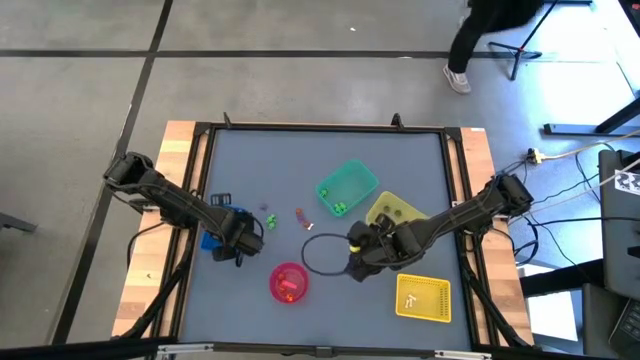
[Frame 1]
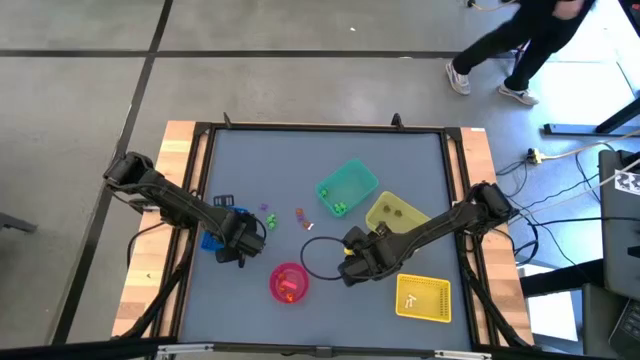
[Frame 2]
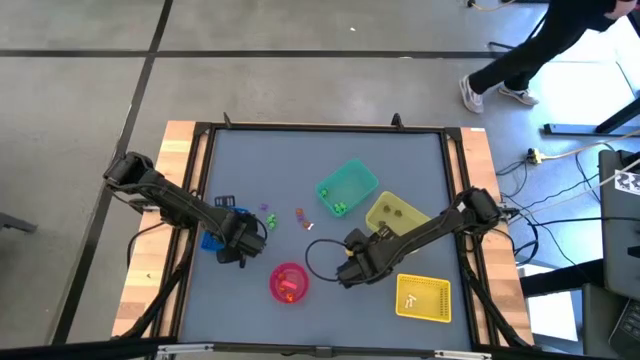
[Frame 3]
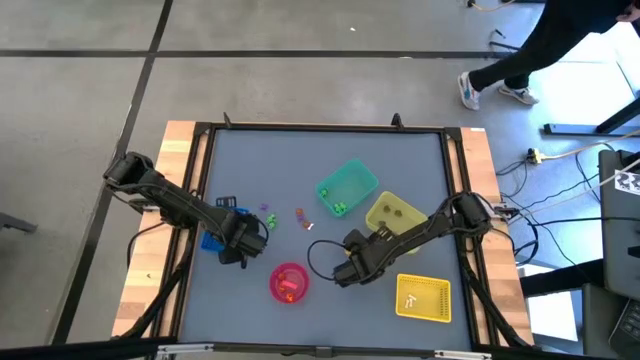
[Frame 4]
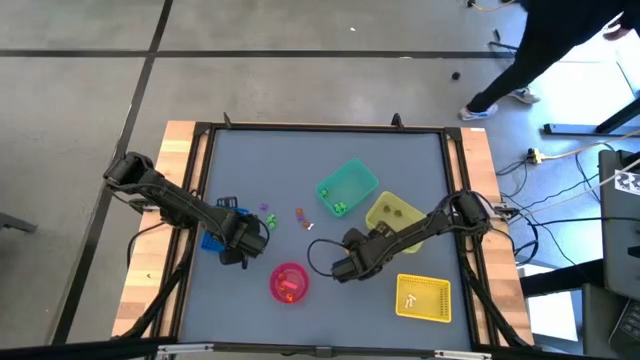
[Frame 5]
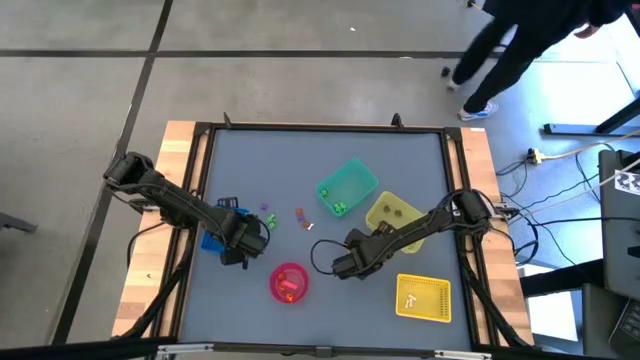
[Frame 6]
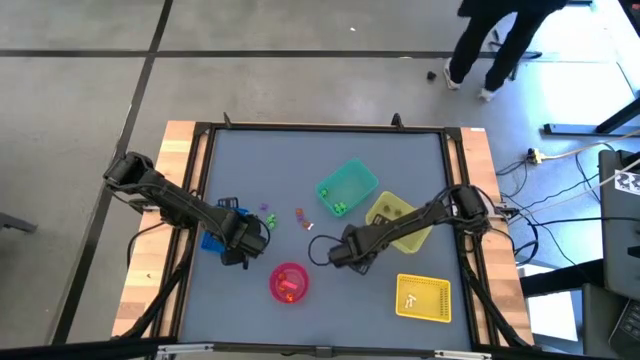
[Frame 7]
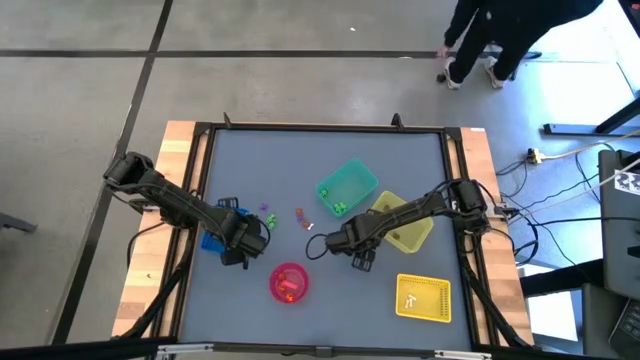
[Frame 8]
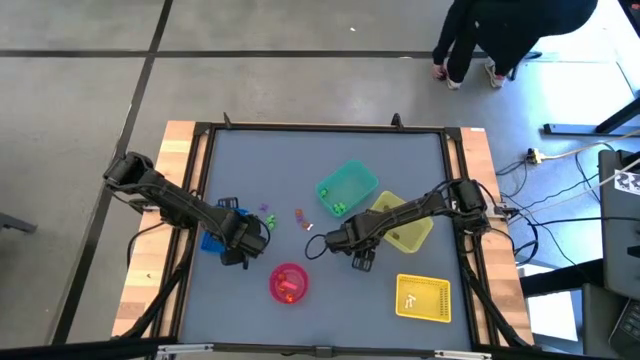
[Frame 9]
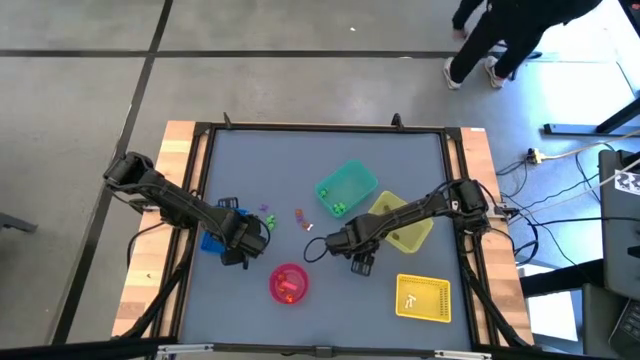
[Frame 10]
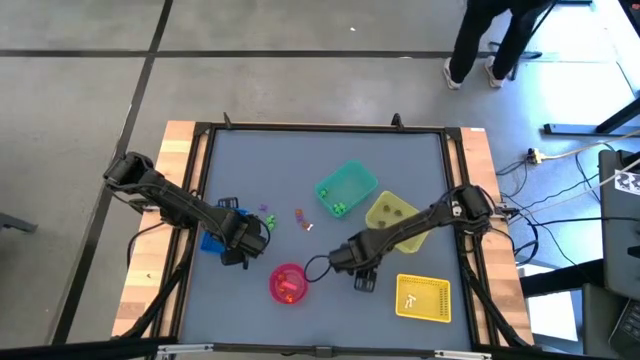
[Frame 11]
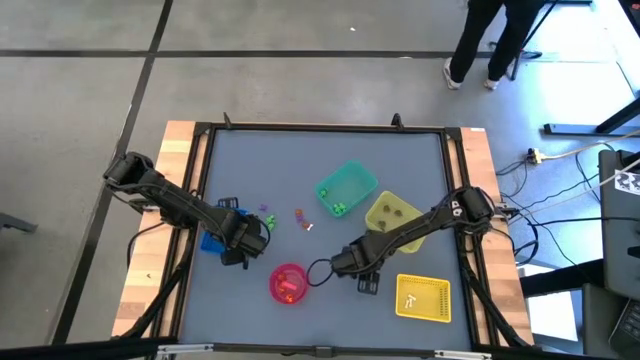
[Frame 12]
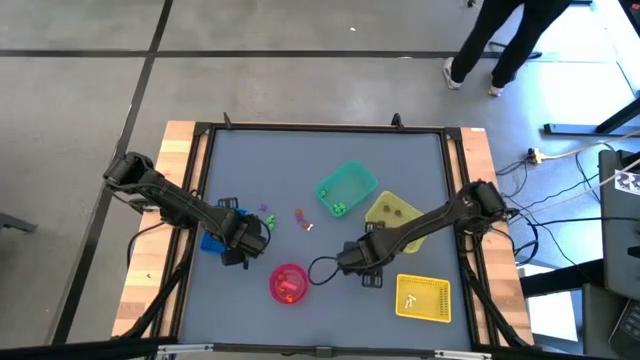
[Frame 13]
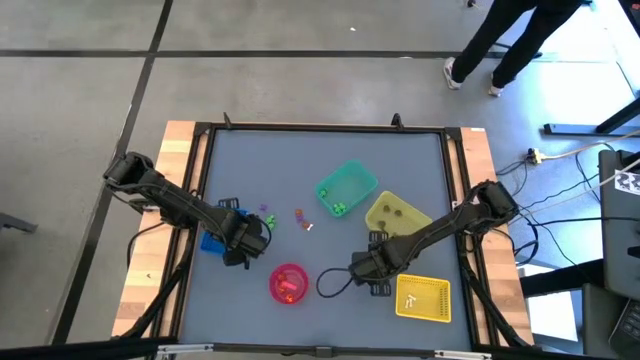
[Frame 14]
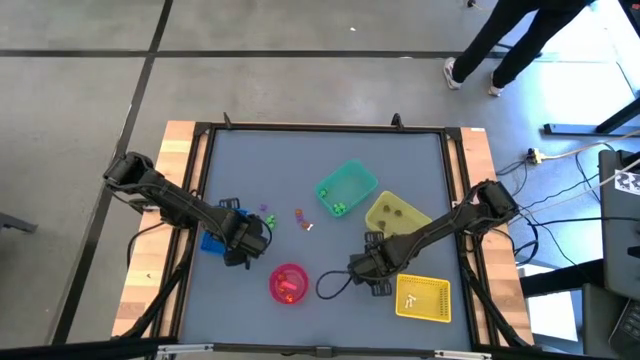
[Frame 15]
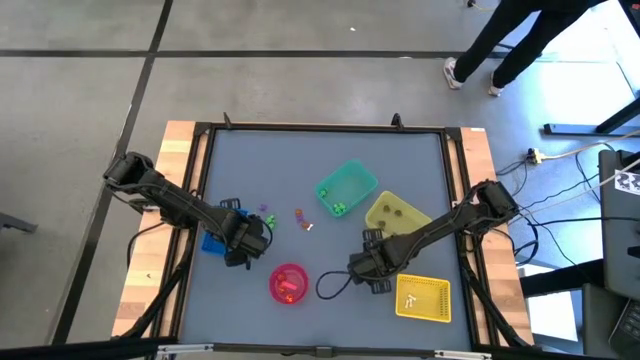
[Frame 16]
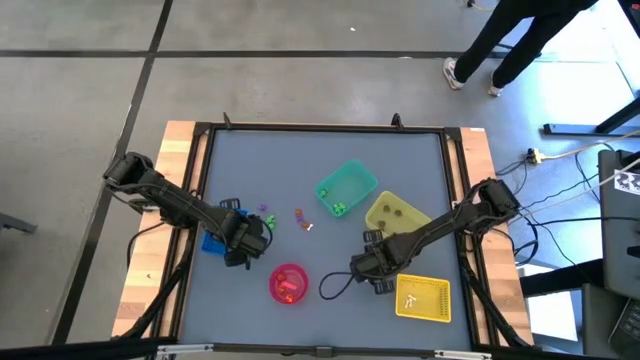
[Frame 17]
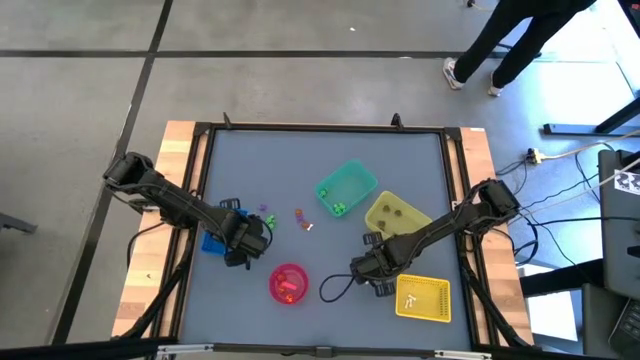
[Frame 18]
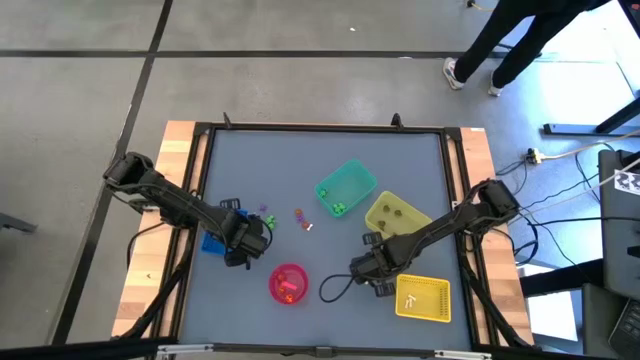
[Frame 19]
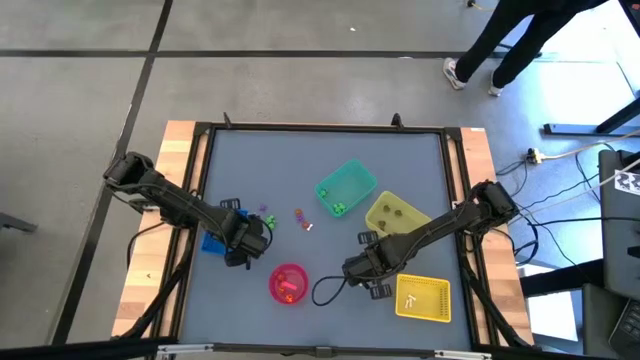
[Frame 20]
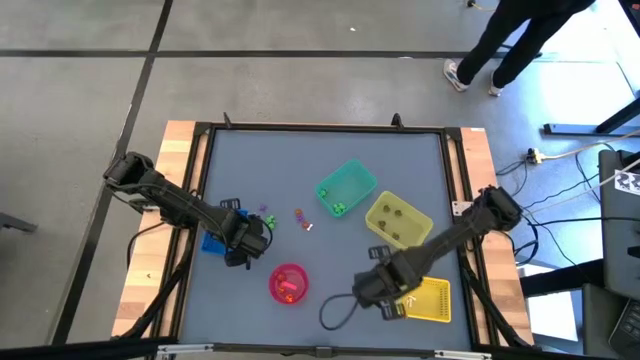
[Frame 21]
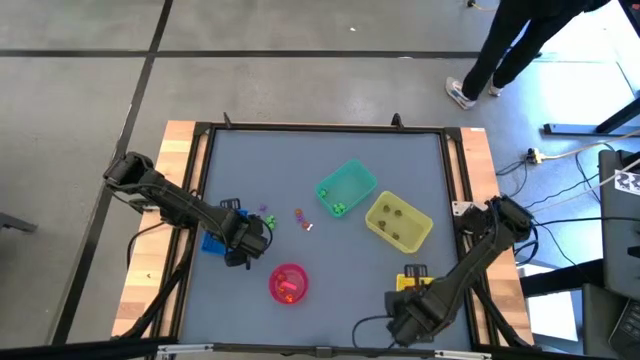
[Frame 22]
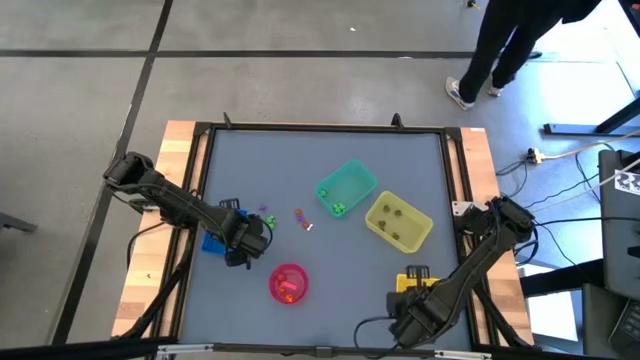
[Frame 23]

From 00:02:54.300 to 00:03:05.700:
Task: Sort Halloween decoration
Put the white bone toy into the yellow bin

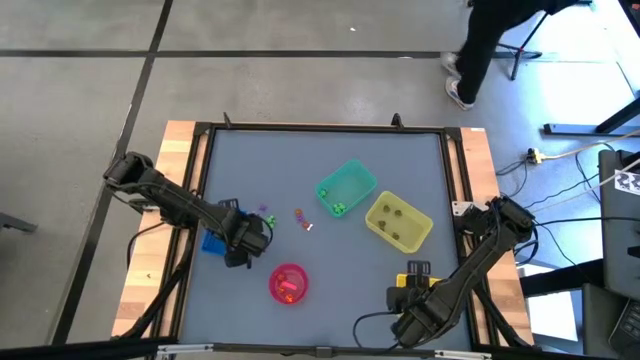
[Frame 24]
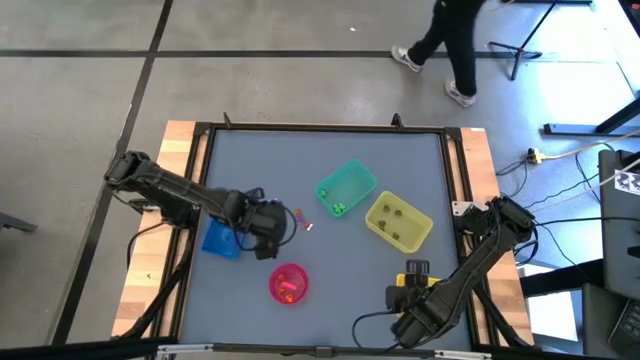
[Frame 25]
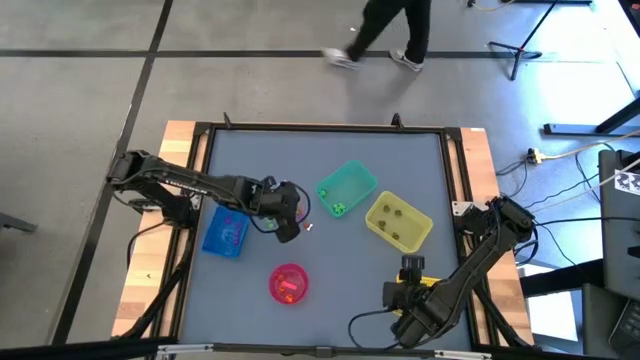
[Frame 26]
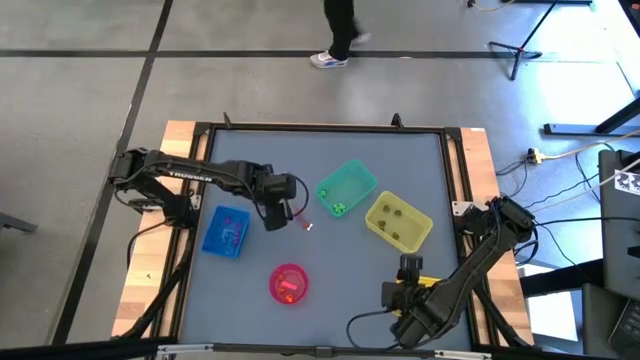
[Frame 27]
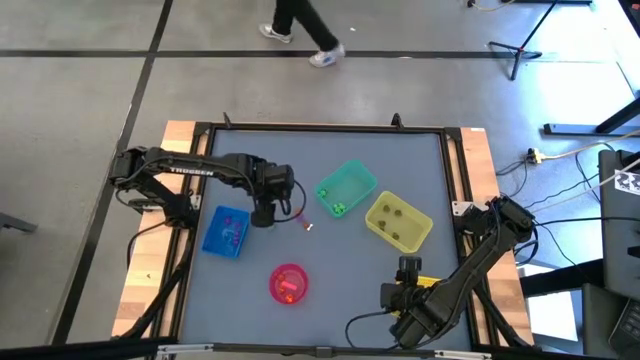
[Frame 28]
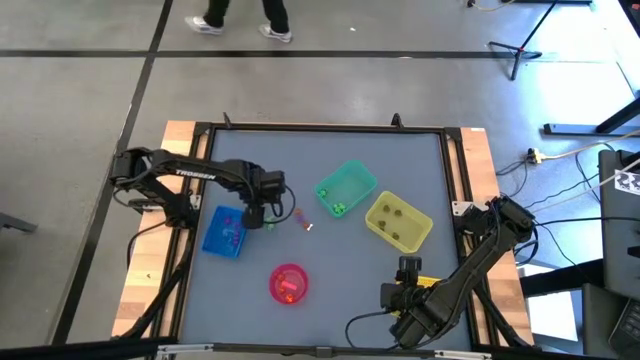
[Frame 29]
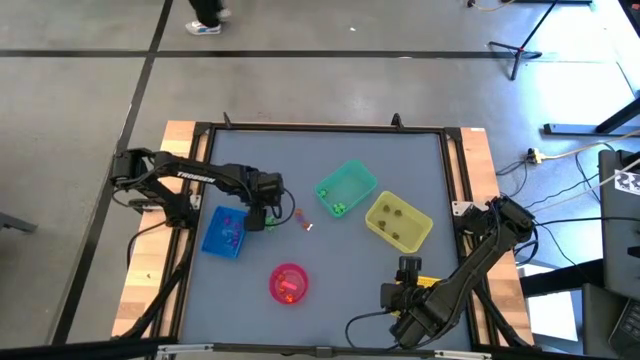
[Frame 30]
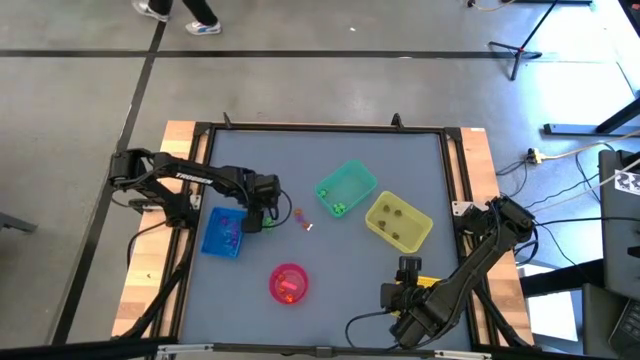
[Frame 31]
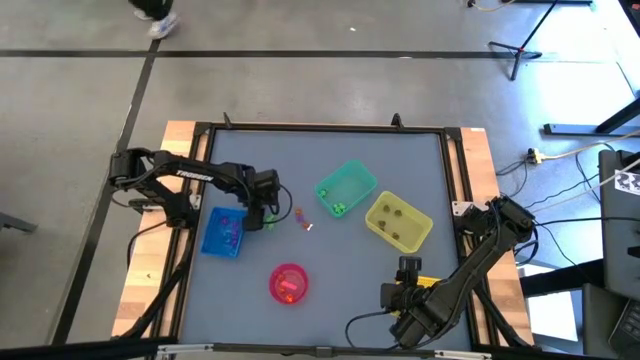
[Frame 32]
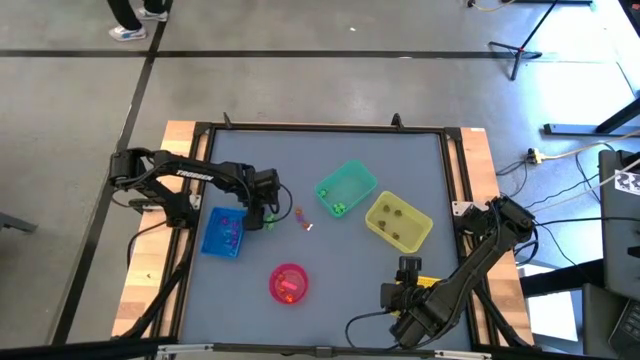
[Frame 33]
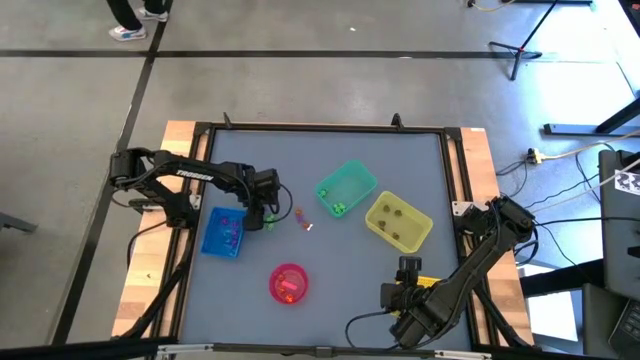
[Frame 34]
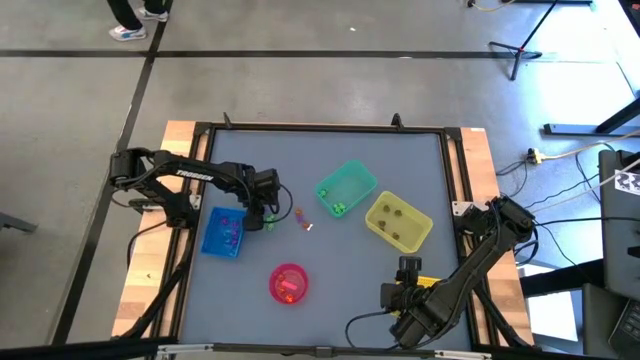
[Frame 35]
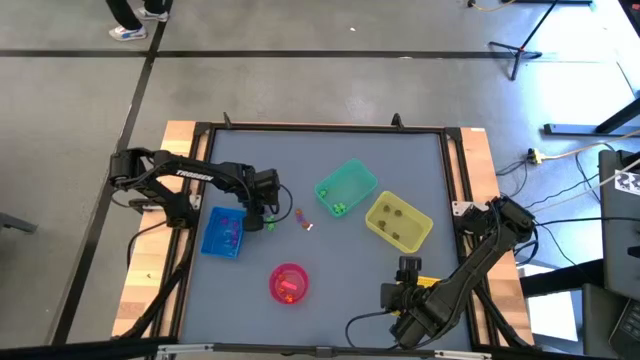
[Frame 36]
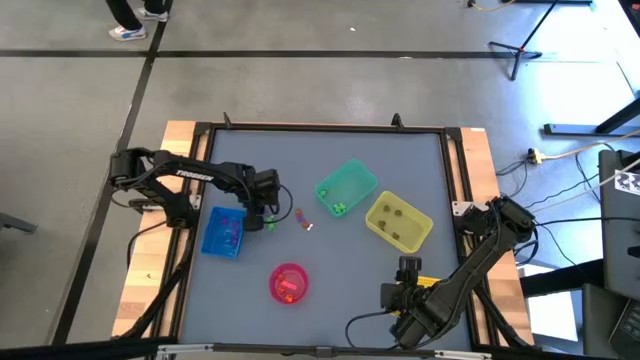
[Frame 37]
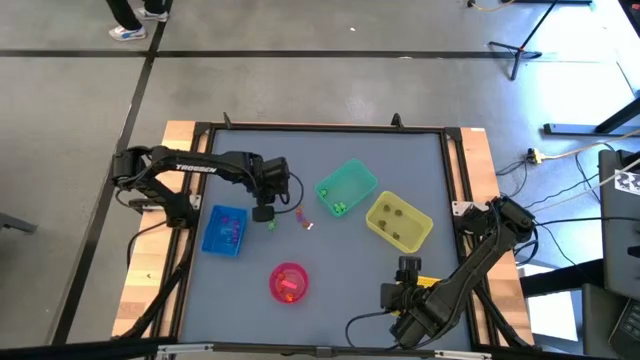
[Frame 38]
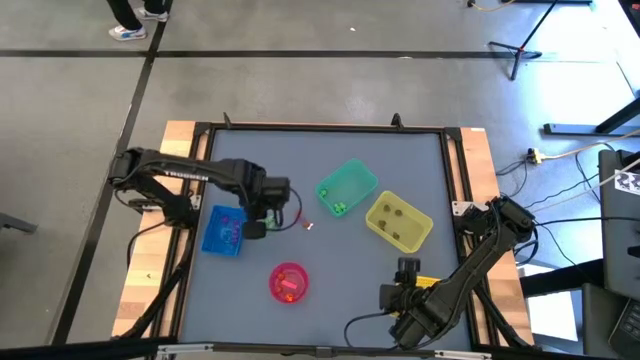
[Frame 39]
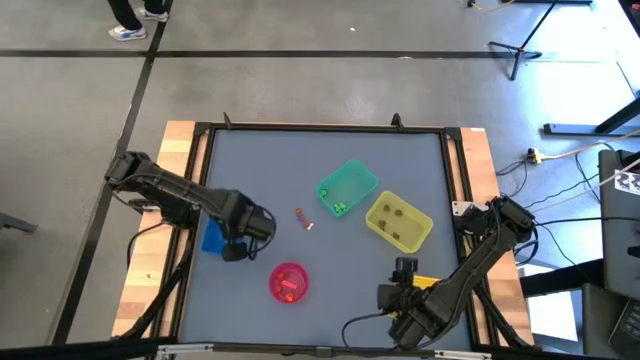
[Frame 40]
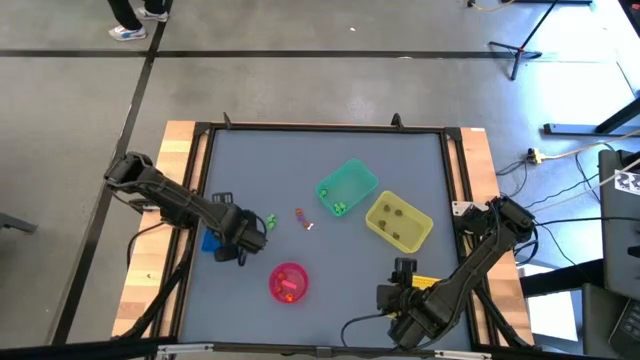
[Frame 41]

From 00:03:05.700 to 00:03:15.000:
Put the violet spider toy into the blue bin

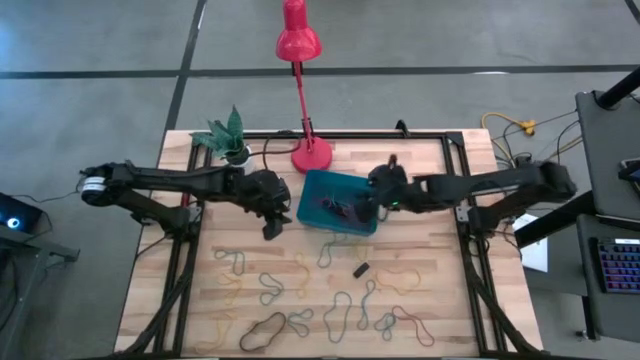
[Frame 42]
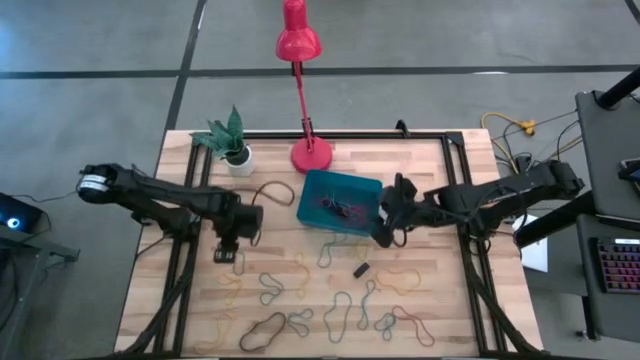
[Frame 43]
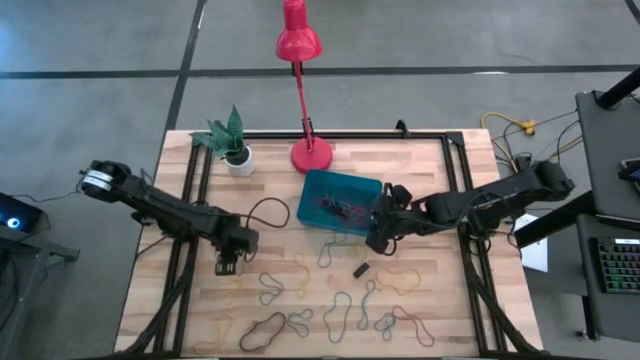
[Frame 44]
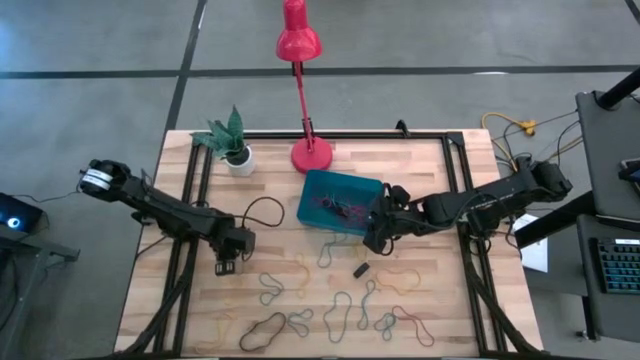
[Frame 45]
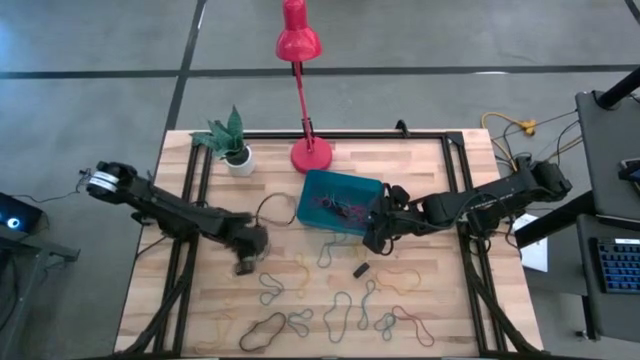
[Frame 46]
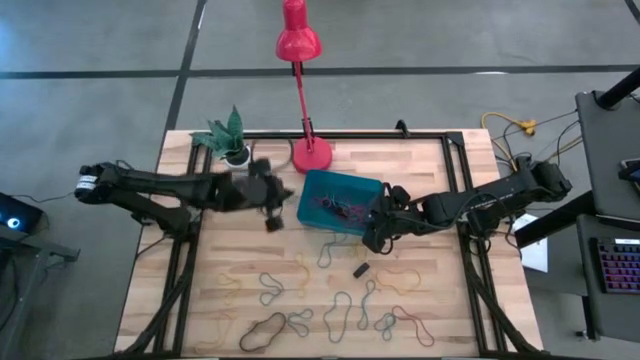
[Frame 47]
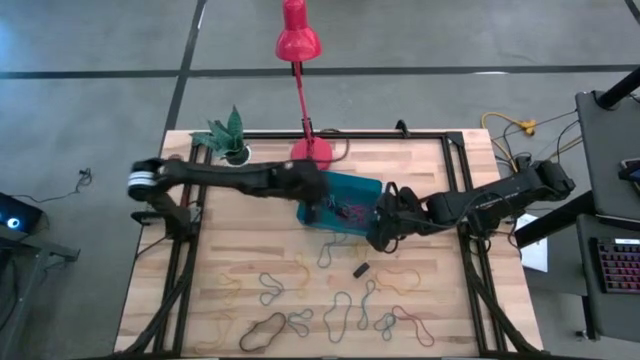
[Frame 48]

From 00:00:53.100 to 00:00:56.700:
Task: Pick and place rubber bands into bin
Put the blue rubber band into the blue bin
